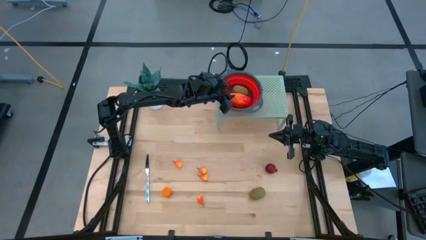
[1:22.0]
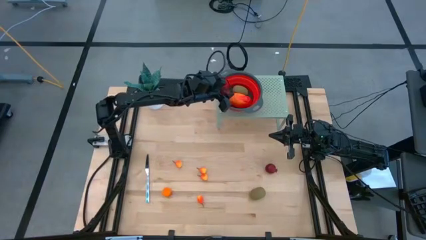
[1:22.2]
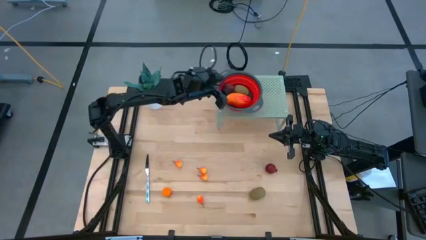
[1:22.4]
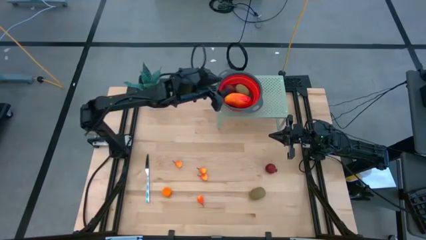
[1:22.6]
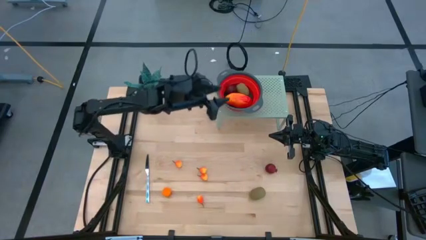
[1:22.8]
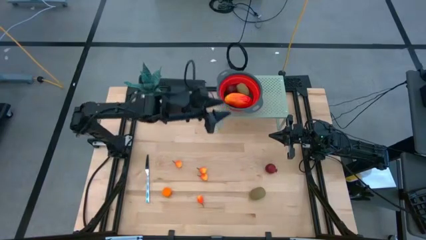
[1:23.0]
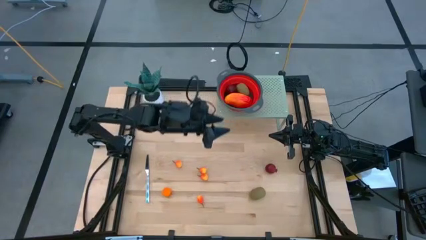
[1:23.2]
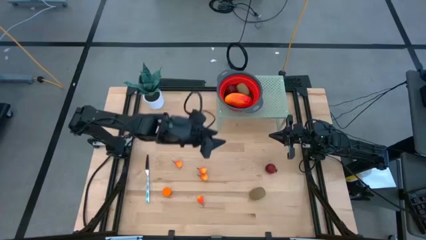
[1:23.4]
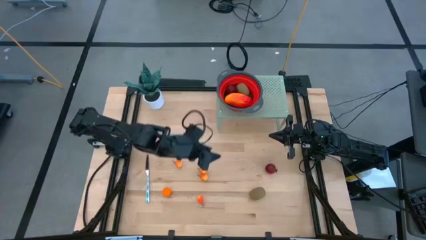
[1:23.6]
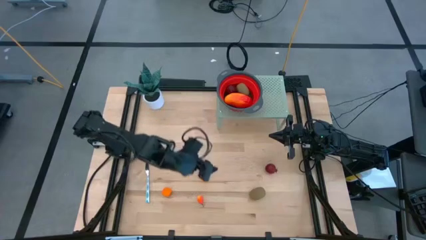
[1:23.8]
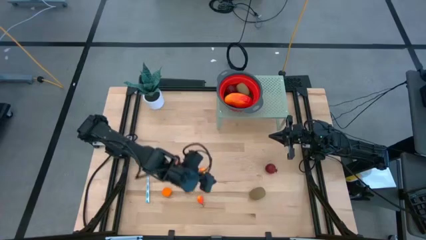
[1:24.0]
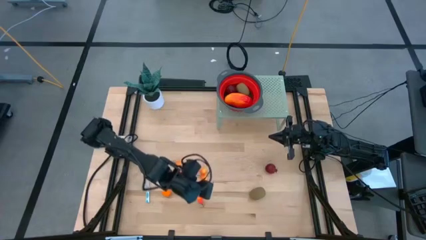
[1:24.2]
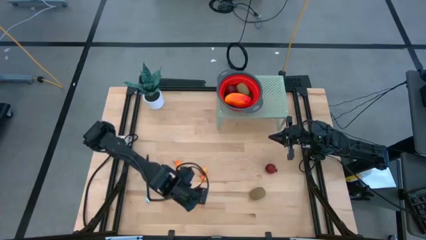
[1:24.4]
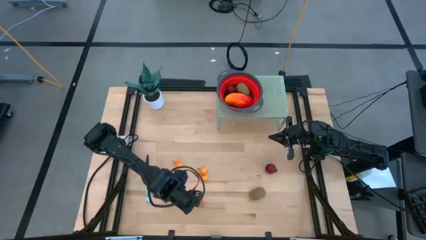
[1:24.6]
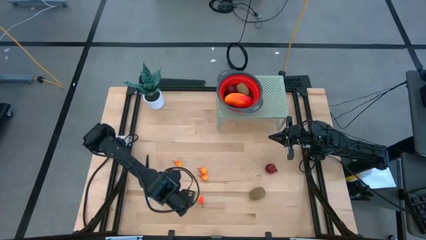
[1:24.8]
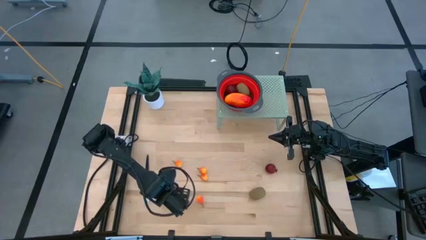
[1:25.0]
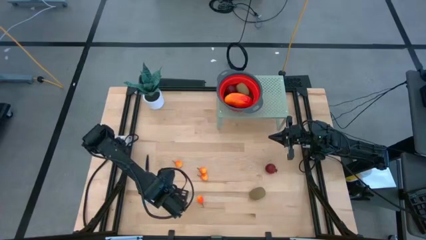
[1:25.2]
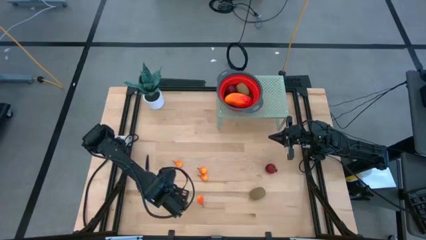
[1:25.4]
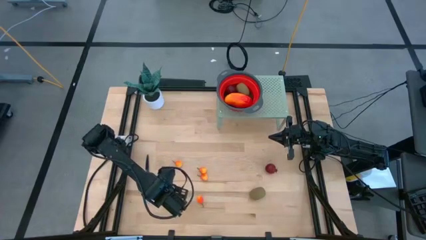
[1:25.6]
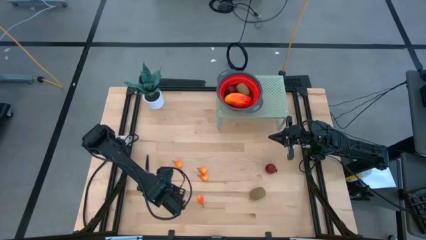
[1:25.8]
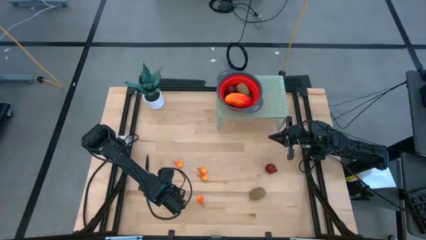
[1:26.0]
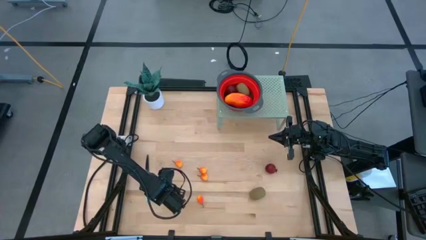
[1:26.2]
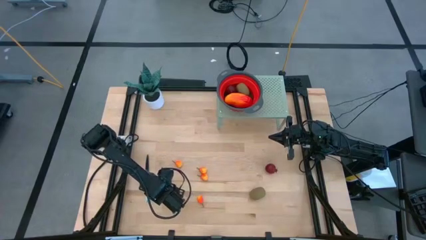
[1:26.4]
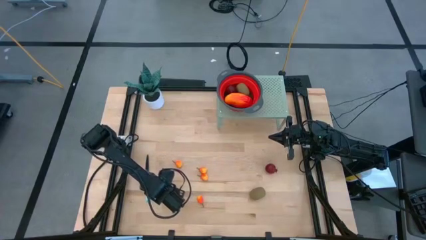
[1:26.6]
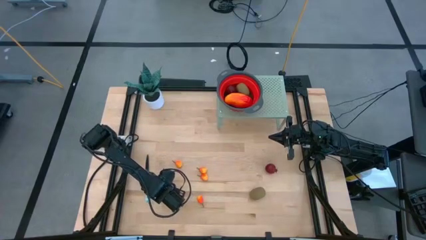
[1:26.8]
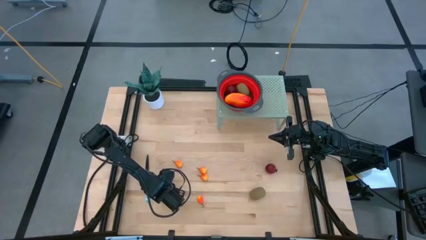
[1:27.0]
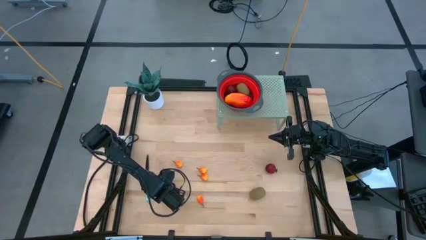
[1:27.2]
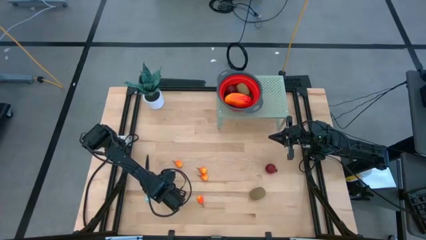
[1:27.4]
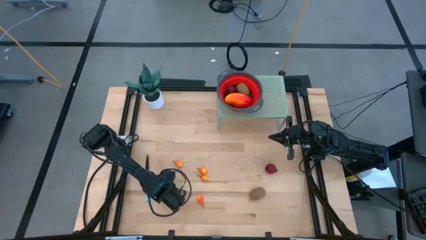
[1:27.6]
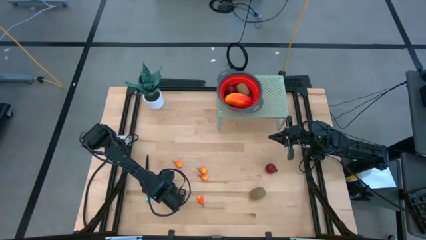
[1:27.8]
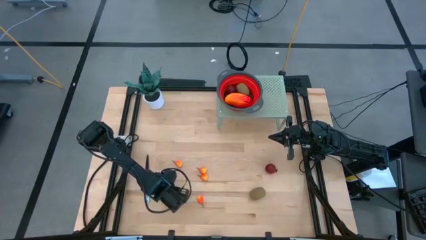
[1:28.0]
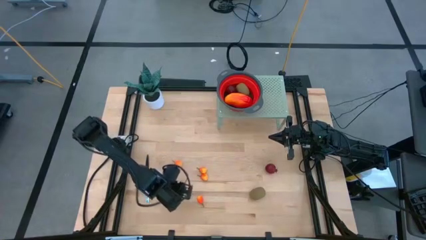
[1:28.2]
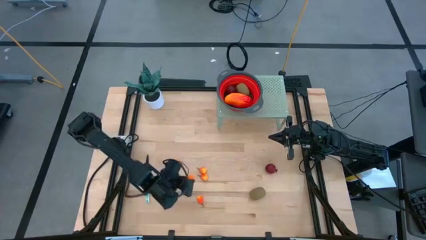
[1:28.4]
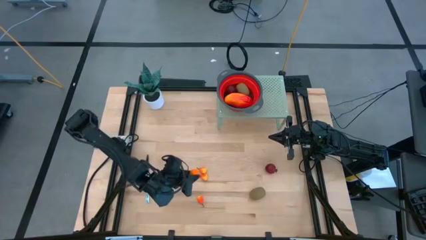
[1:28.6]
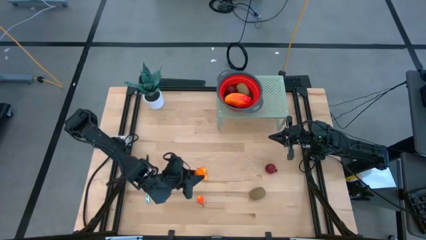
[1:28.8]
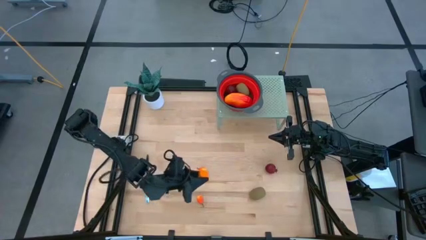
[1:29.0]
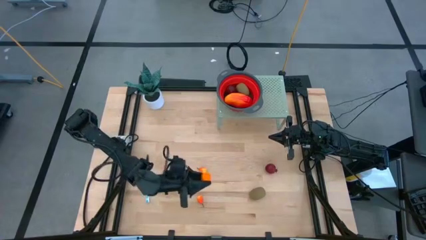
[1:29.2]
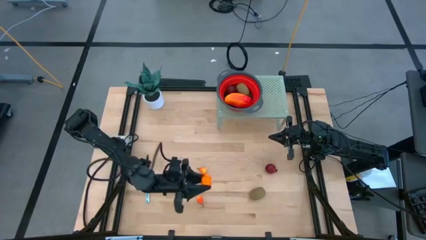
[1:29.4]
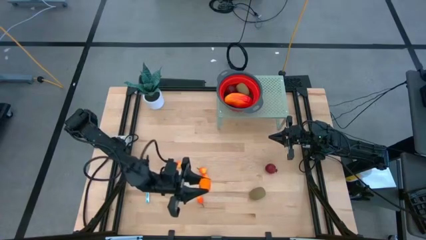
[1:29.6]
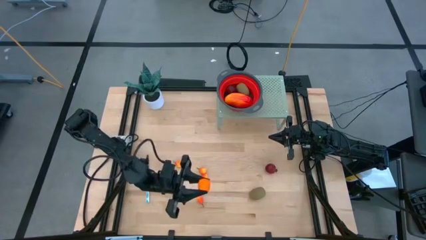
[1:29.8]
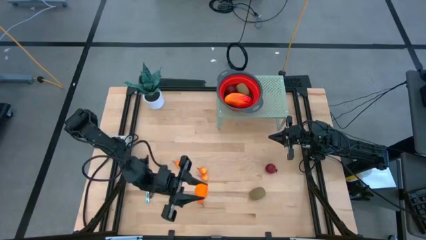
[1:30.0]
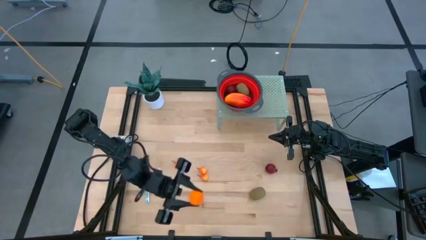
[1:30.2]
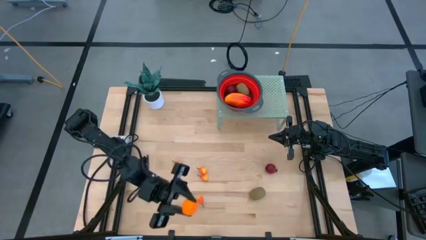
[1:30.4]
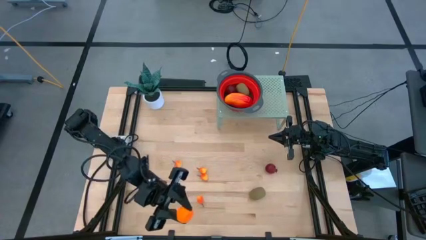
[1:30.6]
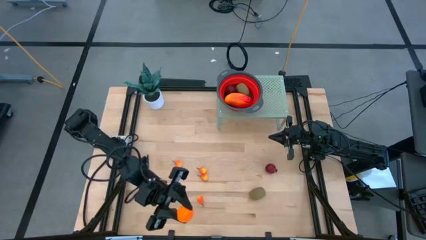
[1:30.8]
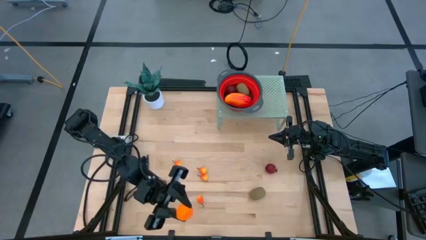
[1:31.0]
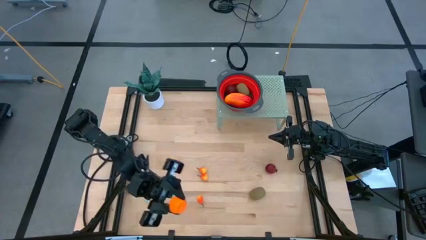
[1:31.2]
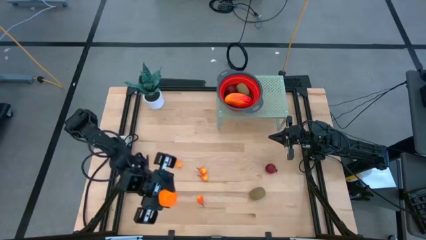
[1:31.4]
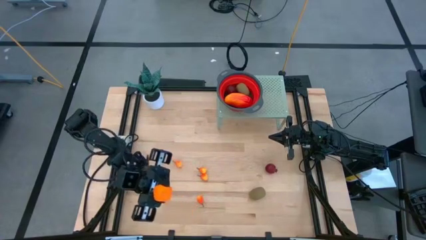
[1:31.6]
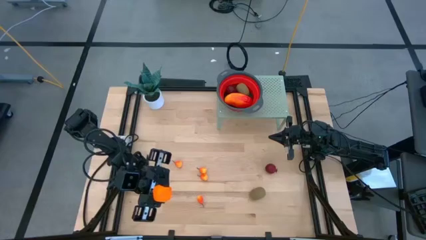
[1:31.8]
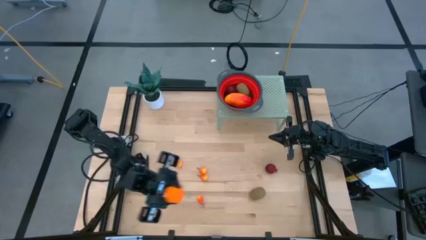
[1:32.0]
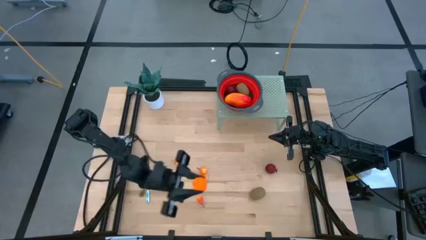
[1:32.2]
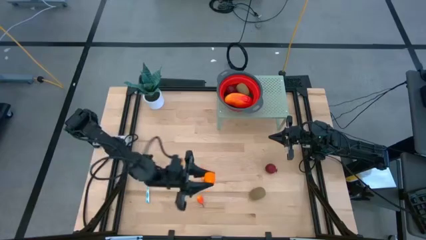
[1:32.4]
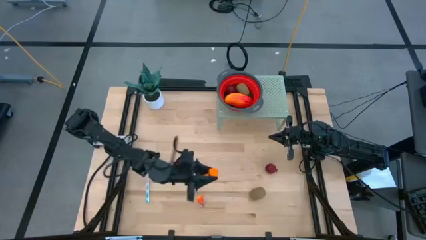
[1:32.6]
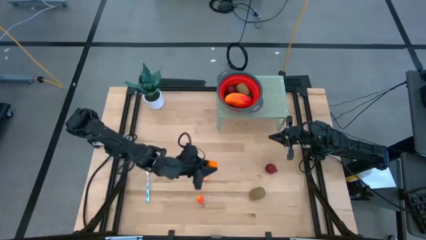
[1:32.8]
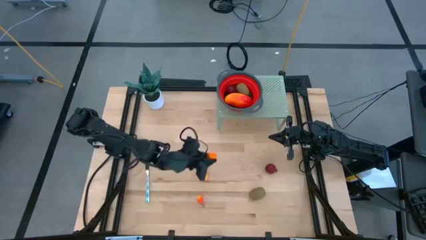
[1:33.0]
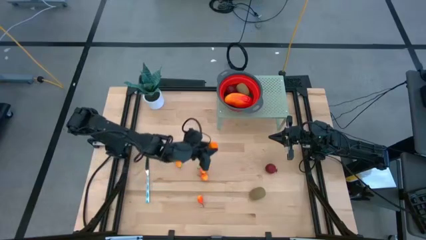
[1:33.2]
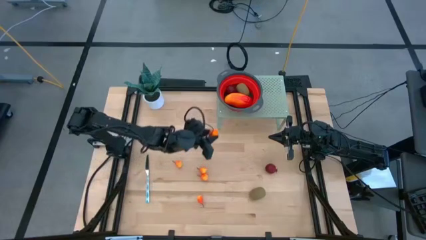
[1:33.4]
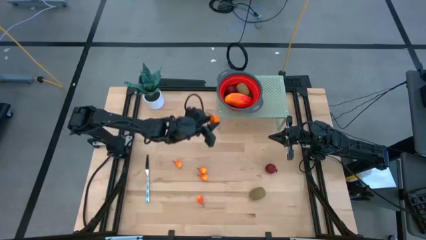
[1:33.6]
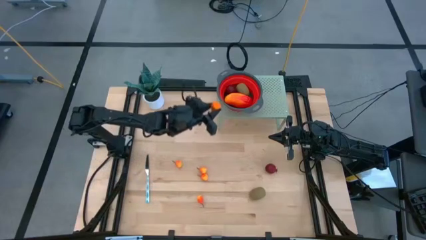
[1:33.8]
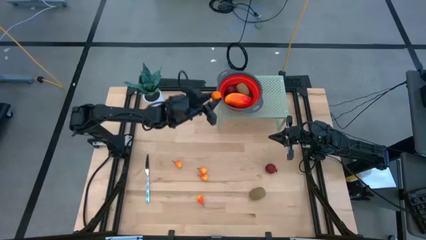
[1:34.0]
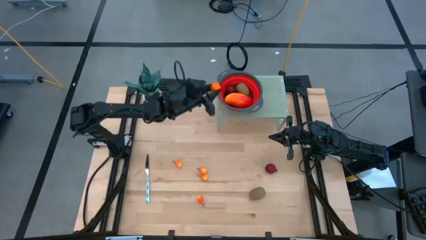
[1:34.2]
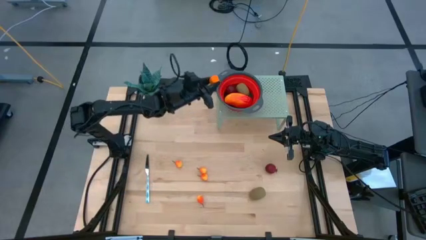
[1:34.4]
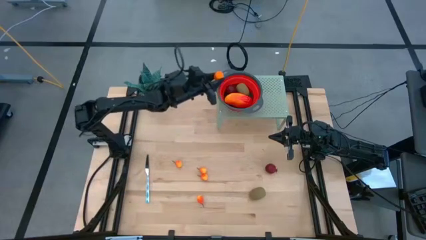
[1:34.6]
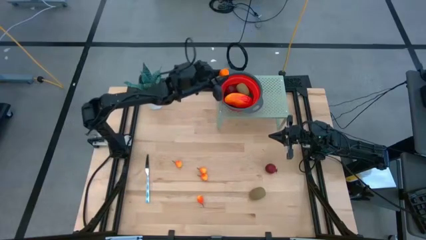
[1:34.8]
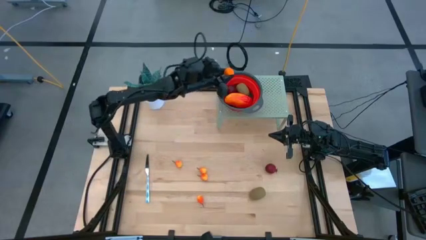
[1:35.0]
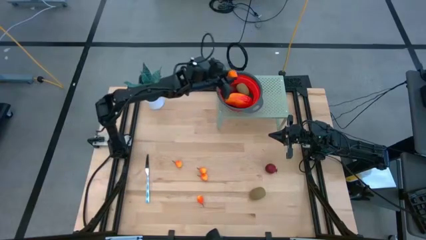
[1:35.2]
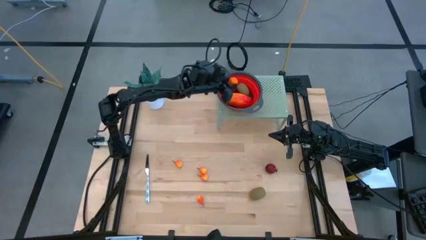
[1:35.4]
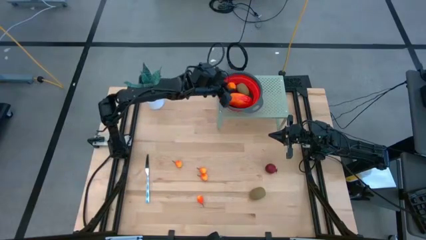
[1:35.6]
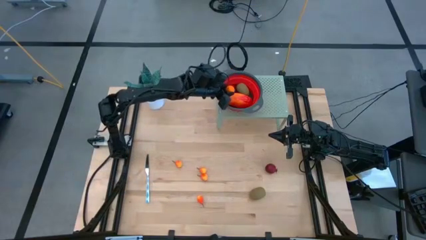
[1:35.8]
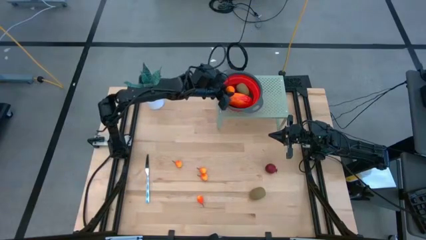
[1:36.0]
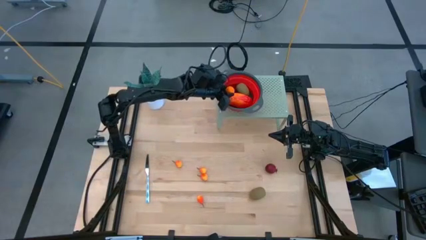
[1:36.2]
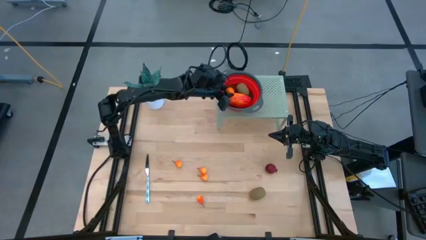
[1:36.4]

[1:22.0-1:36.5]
Task: Pick & Place Fruit
Put the orange tangerine into the red strainer bowl on the shelf
